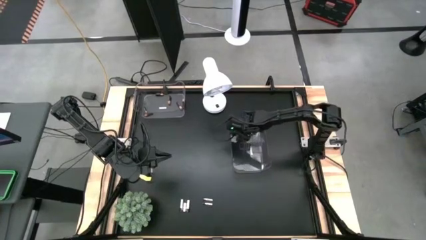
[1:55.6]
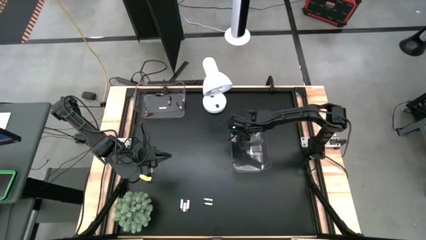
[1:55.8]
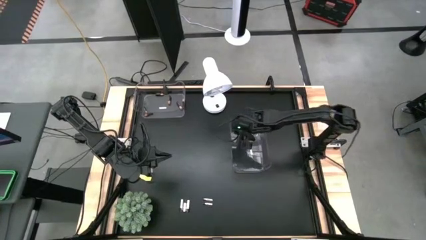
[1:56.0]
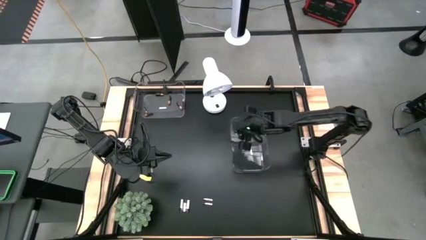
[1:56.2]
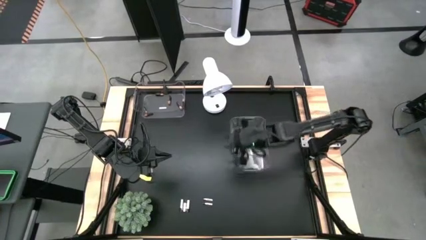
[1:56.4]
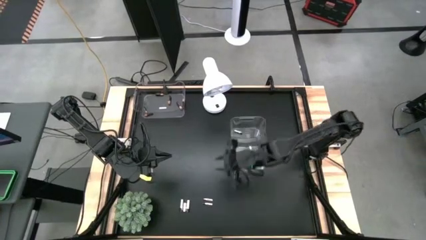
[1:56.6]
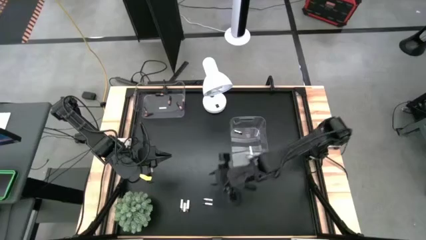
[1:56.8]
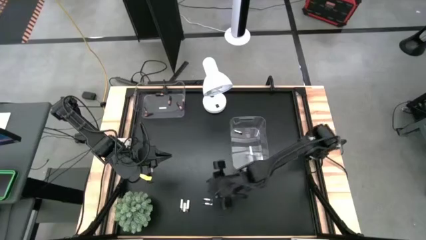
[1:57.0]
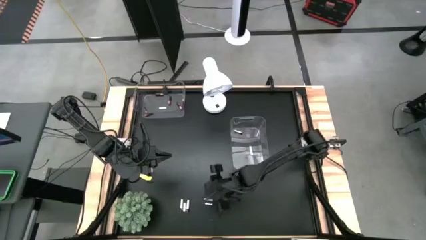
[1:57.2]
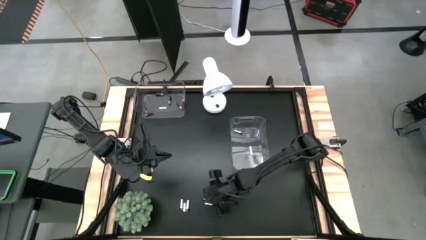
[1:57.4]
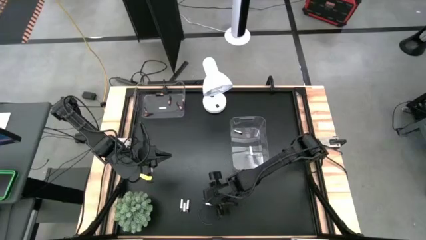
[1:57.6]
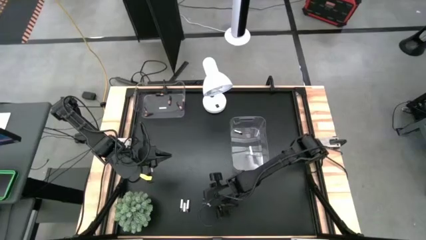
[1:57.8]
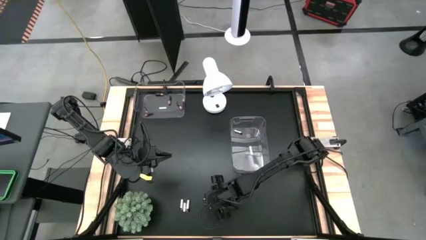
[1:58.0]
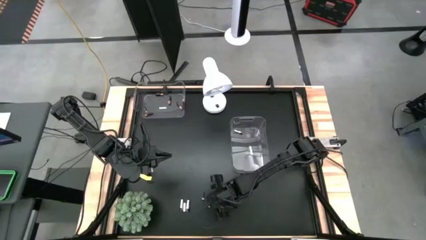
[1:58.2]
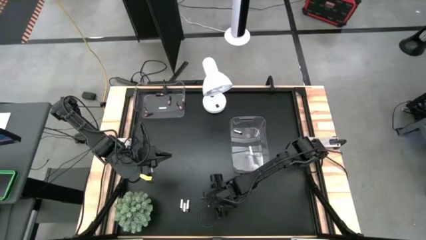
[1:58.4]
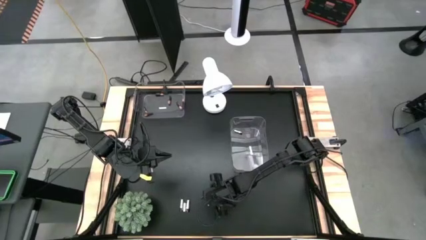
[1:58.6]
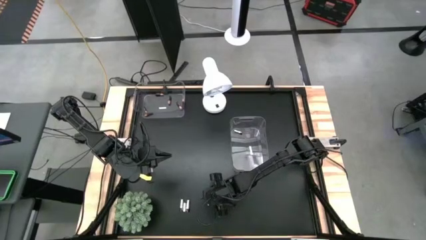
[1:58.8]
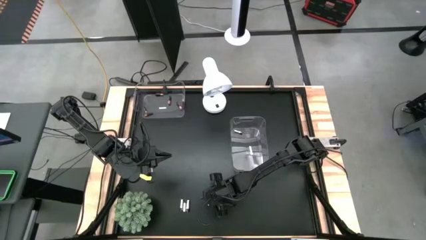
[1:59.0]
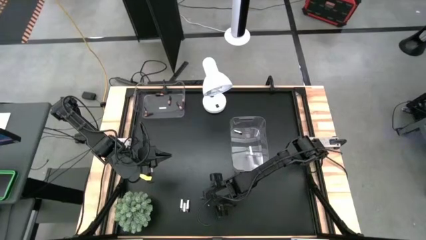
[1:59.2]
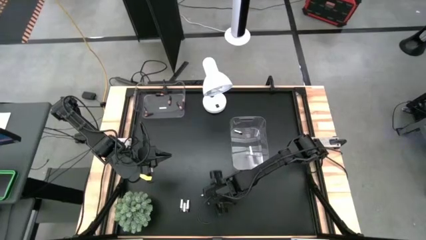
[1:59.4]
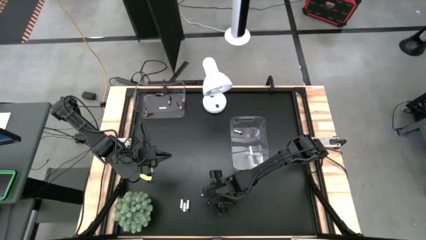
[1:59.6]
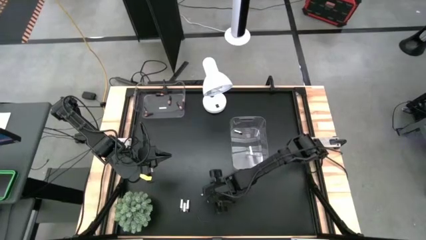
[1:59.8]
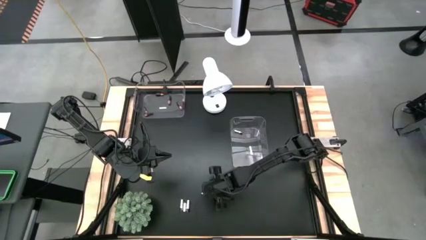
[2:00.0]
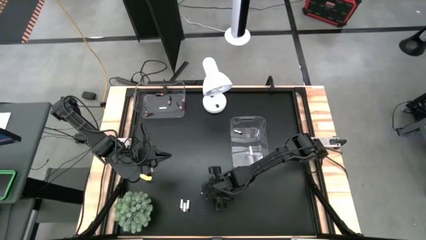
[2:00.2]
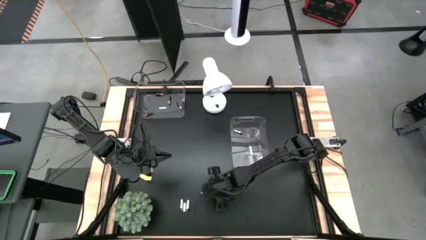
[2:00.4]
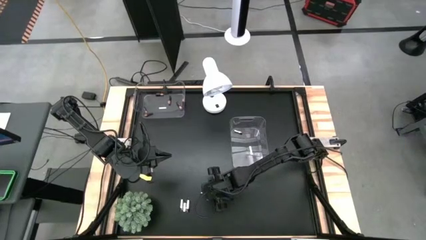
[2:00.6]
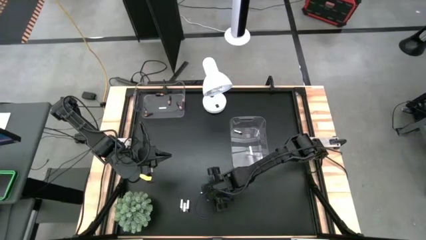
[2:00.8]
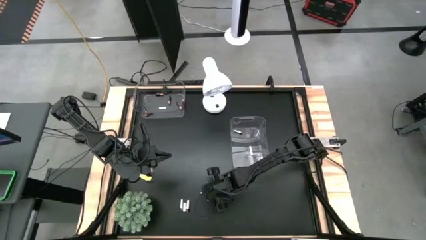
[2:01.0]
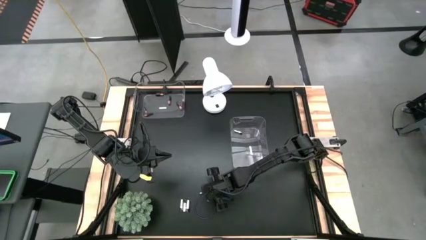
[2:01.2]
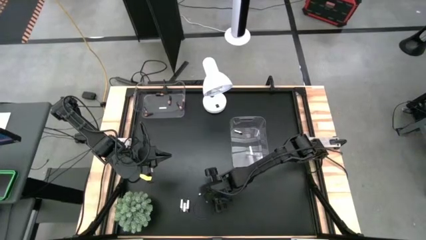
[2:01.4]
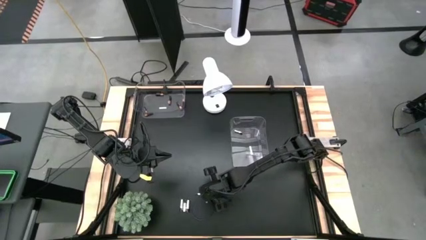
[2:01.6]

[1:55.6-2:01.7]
Task: Sort batteries
Put the silver battery into the bottom transparent bin

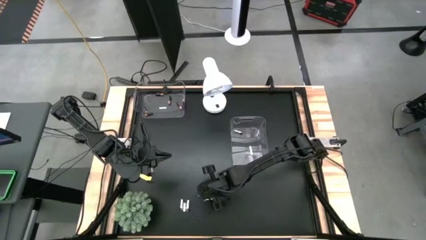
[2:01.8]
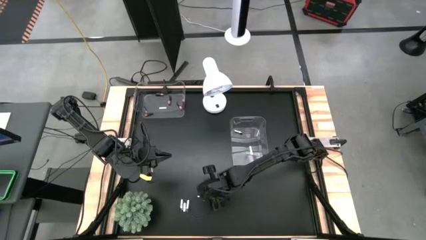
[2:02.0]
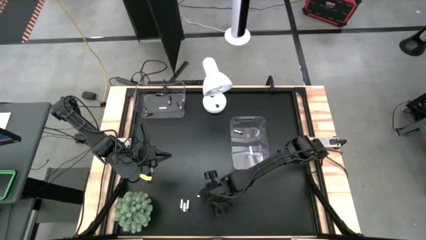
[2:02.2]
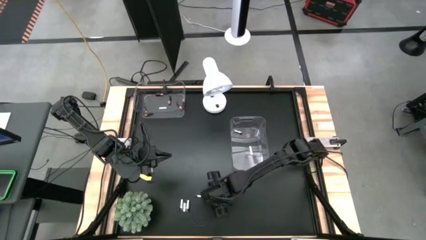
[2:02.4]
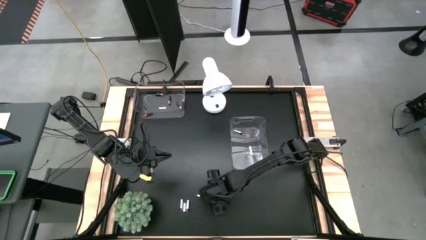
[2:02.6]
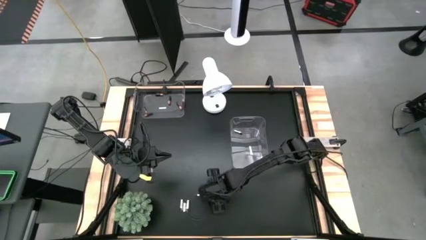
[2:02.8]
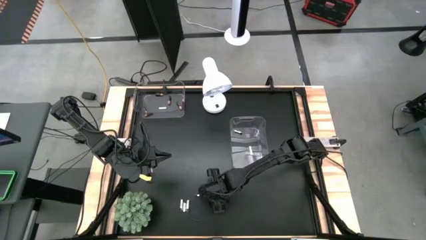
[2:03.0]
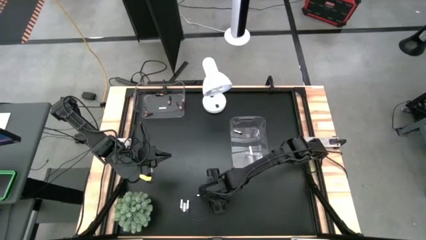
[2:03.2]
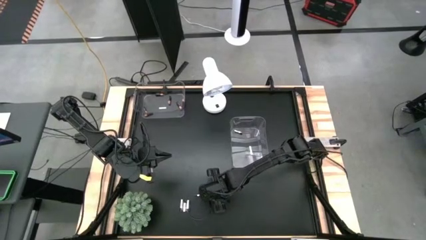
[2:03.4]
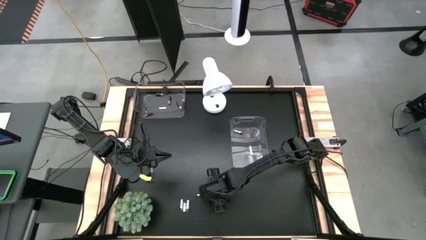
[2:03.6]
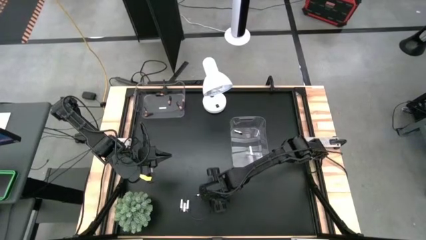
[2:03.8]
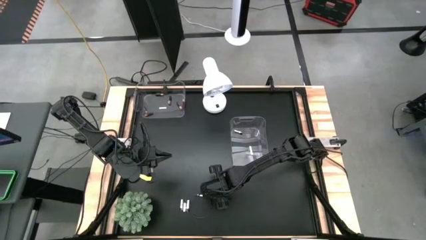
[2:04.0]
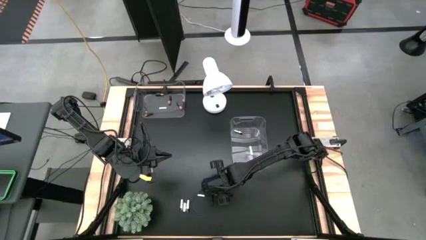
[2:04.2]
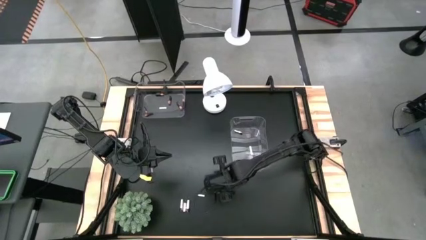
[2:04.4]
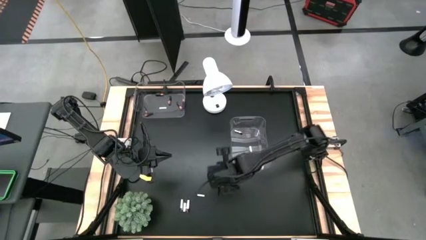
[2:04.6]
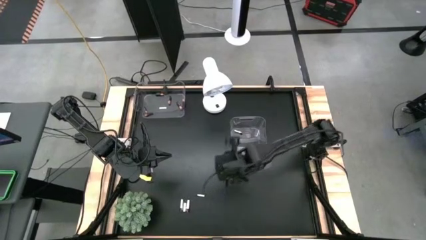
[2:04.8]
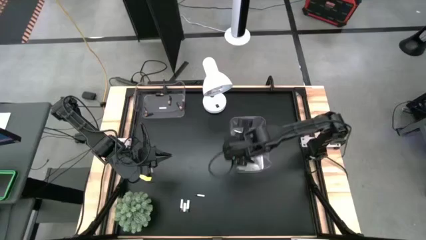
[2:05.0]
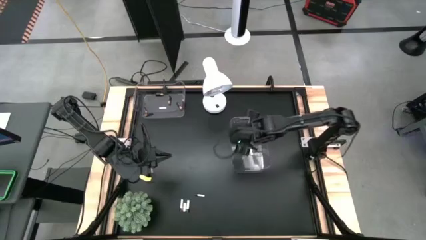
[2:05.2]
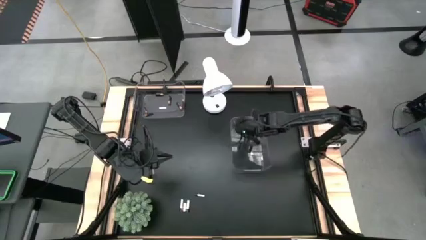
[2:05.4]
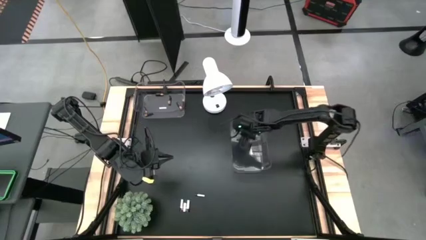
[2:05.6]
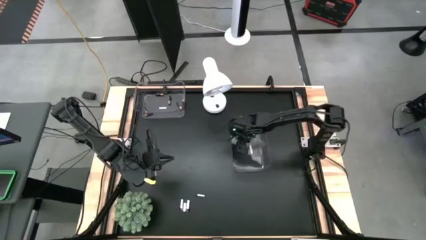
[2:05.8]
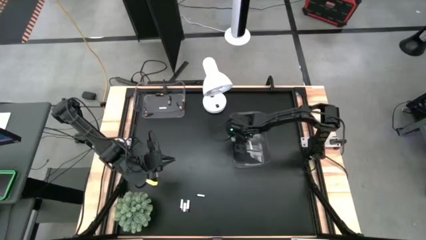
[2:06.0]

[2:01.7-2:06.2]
Put the silver battery into the bottom transparent bin

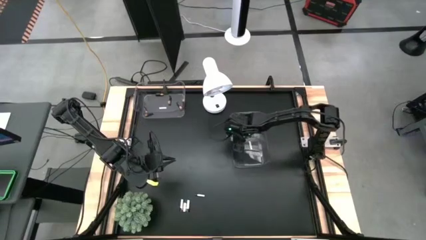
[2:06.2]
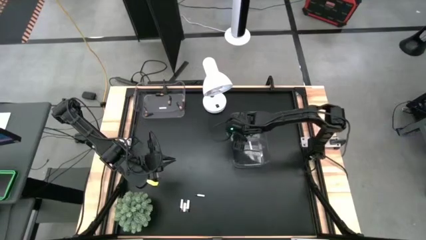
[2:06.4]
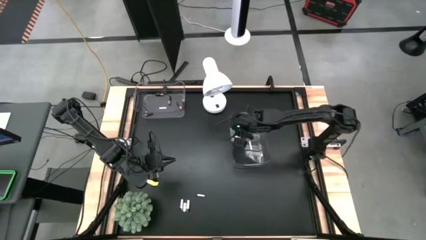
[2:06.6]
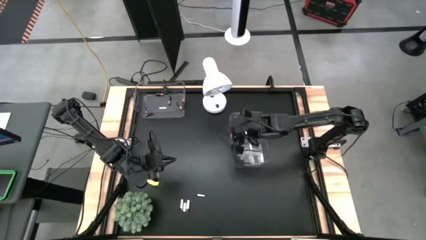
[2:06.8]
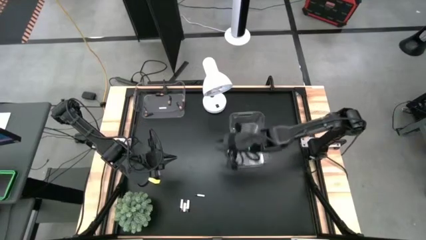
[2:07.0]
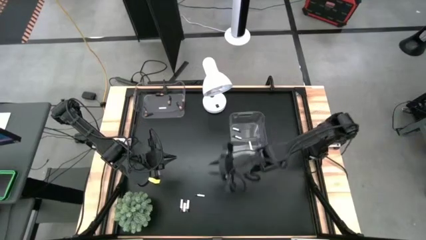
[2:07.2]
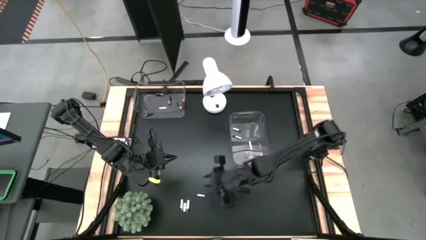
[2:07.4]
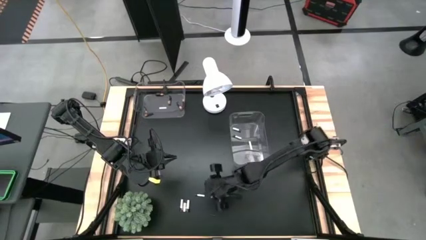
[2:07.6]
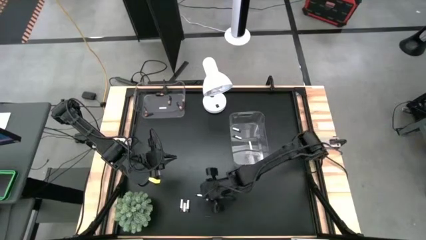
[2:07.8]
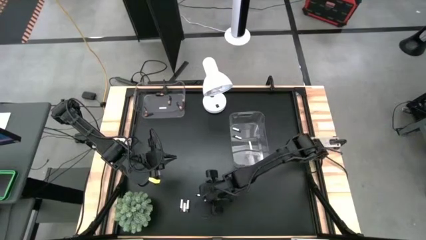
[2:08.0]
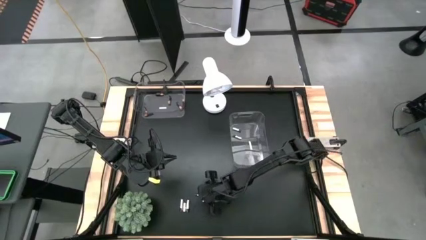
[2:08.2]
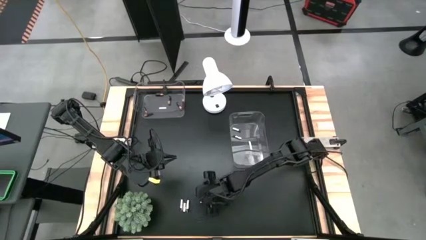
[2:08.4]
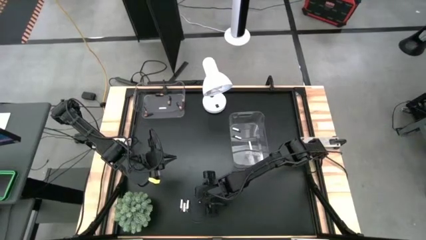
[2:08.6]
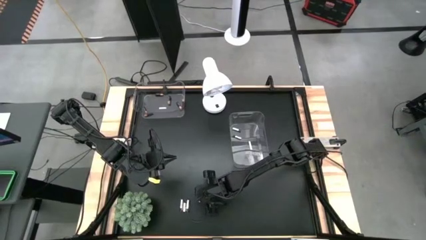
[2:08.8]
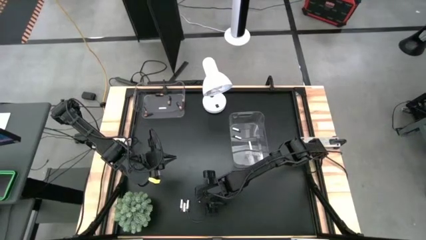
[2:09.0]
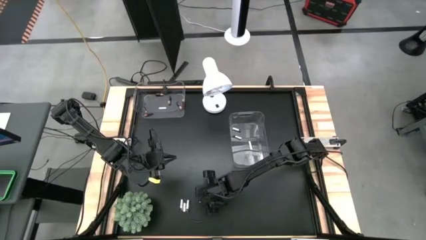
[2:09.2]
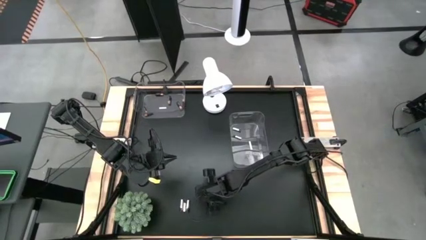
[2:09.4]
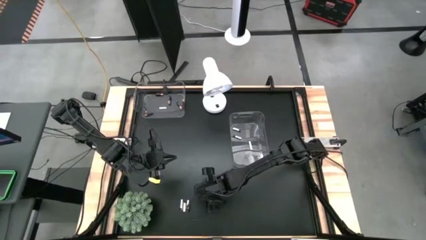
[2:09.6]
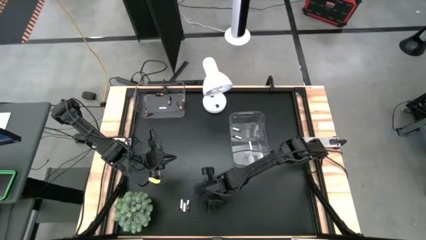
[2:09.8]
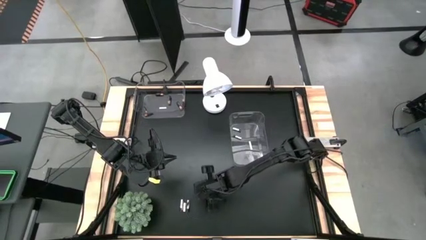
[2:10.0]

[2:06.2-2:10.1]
Put the silver battery into the bottom transparent bin
